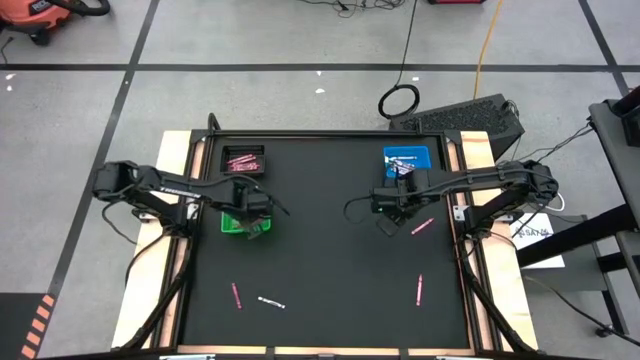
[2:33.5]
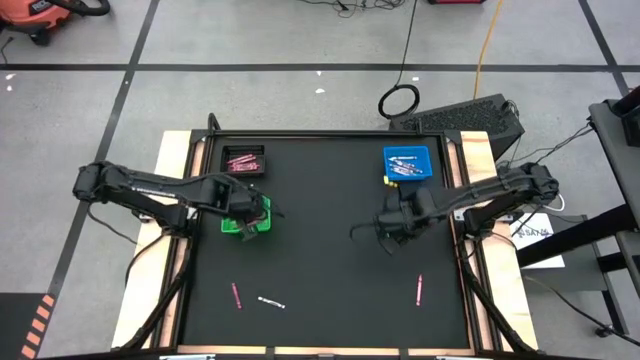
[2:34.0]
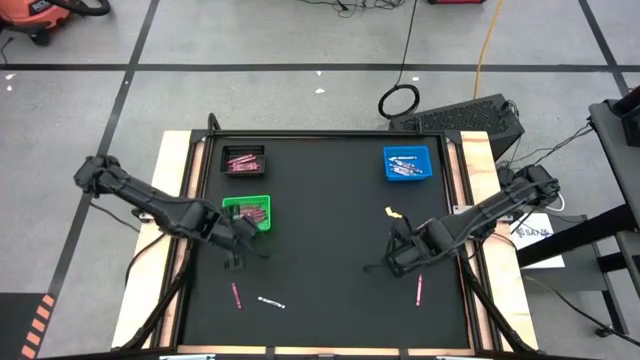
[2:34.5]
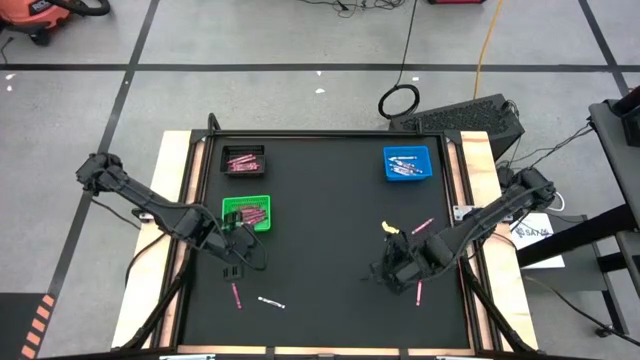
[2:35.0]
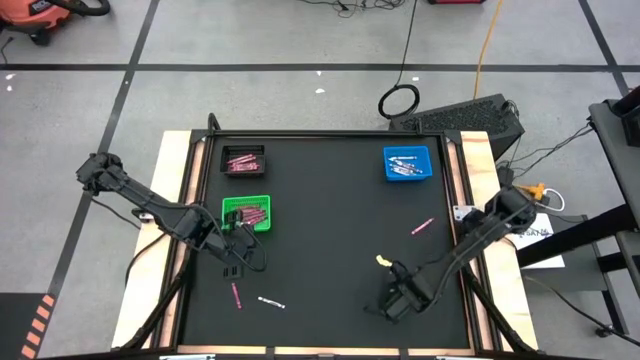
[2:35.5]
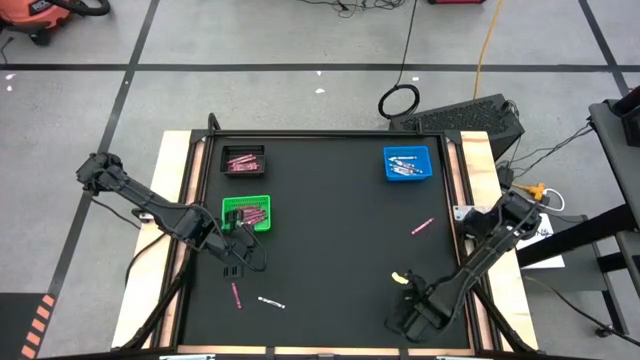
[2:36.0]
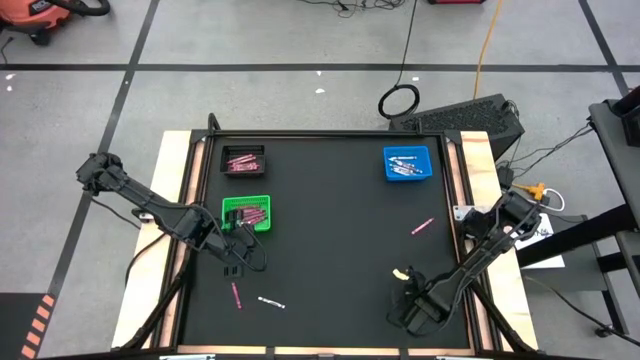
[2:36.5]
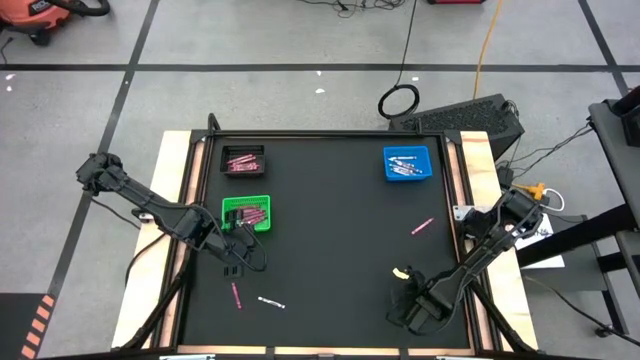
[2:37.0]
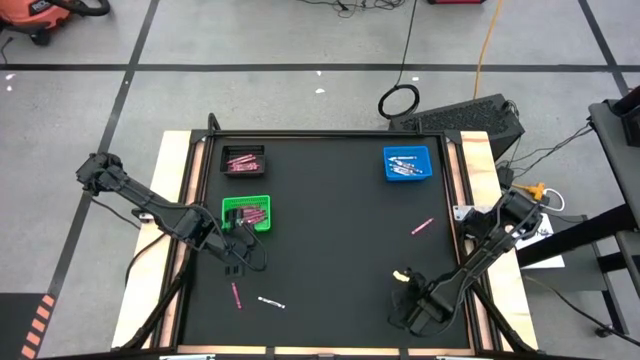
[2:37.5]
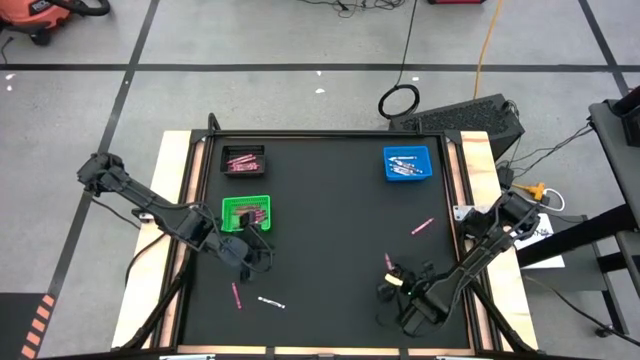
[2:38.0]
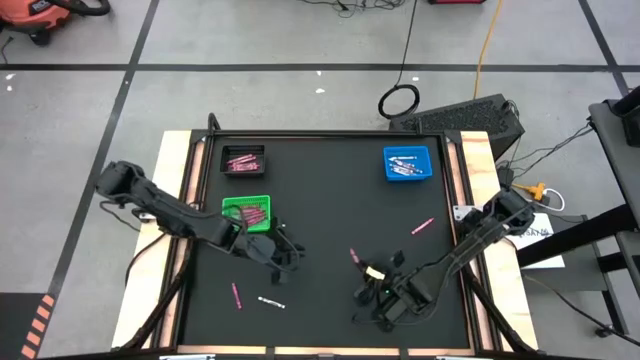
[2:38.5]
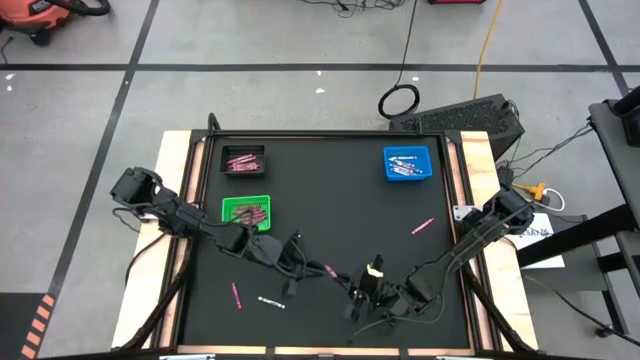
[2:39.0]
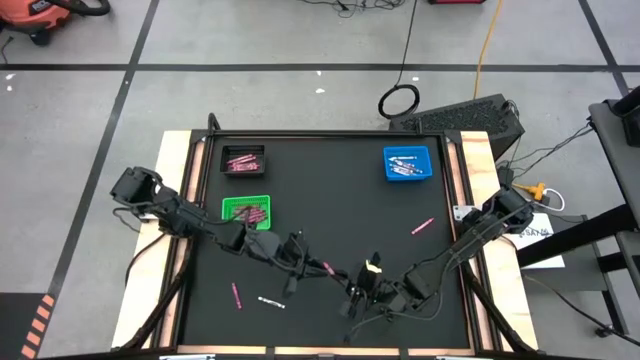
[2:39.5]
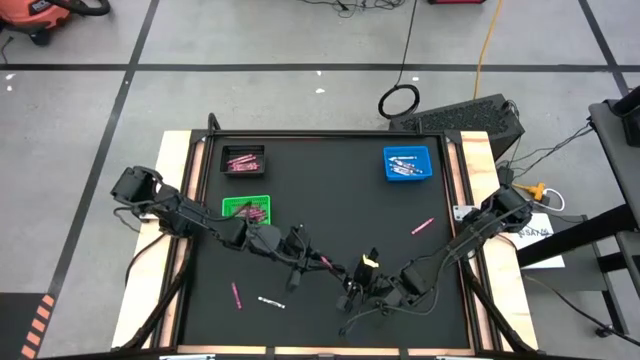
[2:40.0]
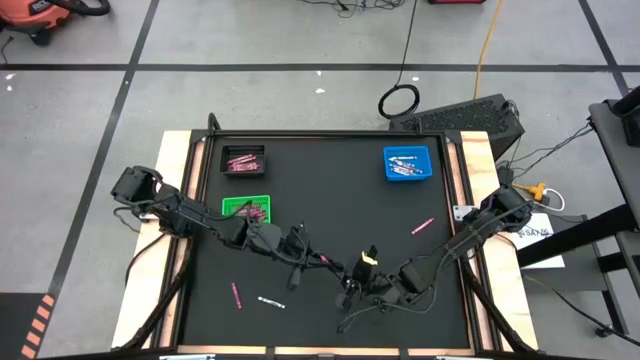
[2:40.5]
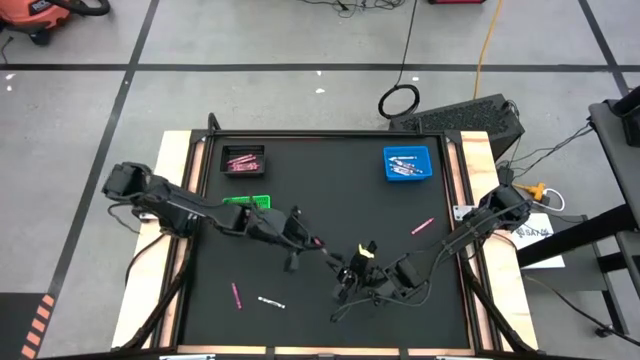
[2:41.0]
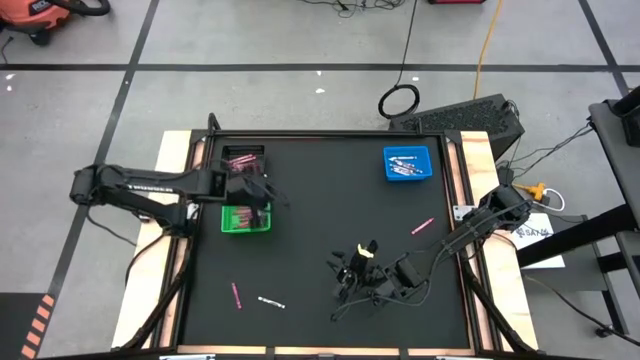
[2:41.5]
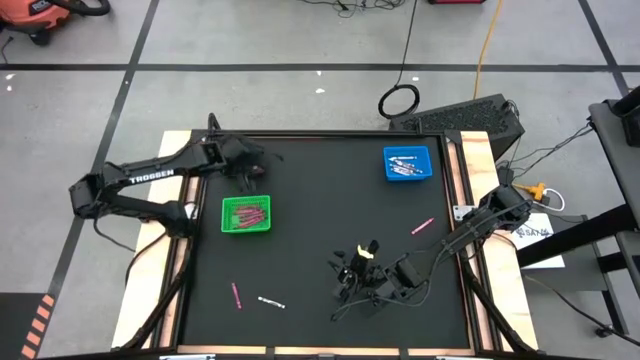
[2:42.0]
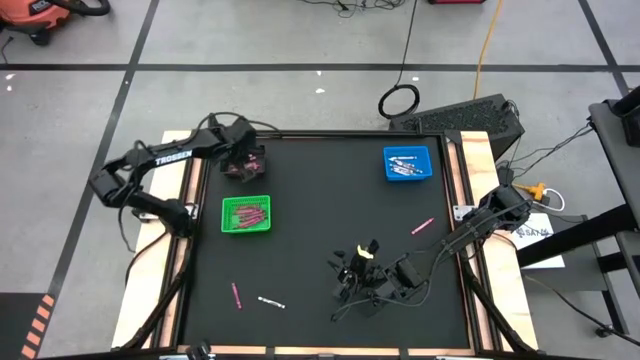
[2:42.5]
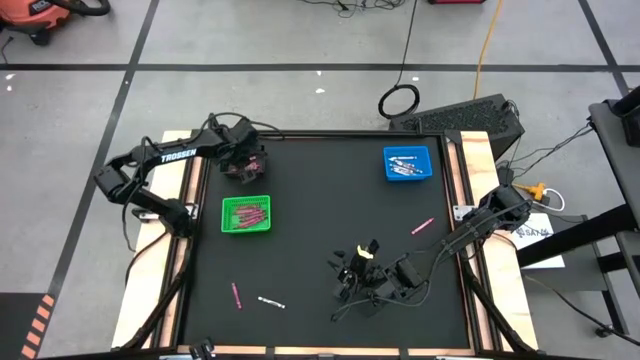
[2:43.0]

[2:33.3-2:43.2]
Task: Sort crayons
Put the pink crayon into the black bin

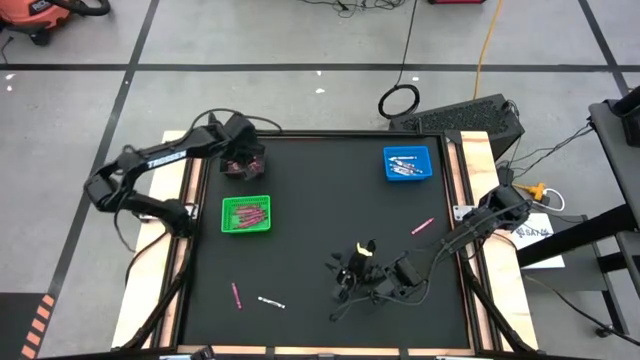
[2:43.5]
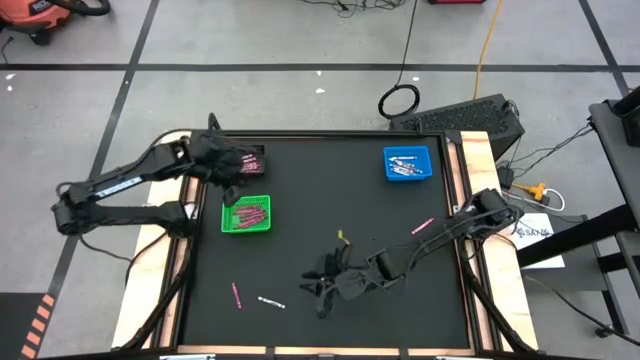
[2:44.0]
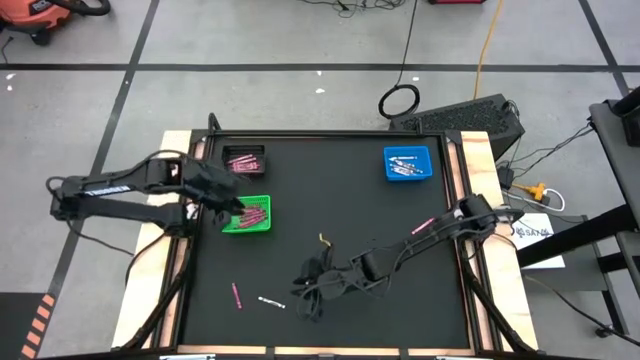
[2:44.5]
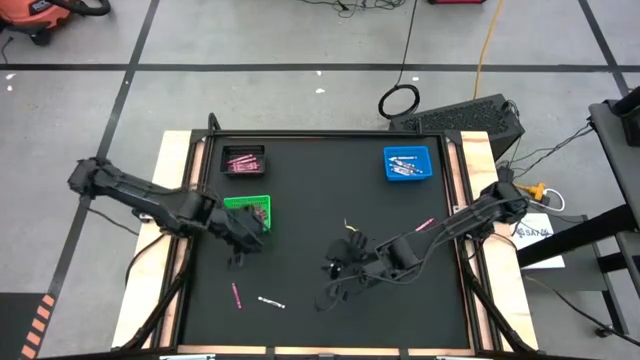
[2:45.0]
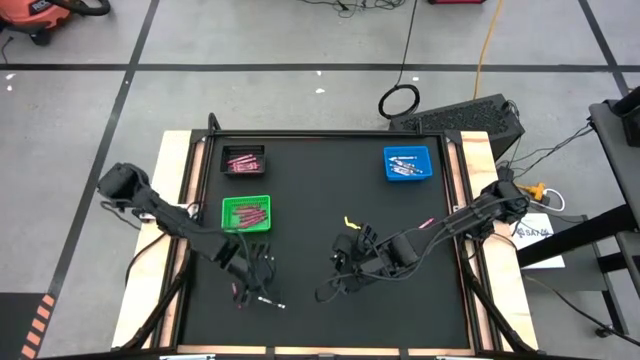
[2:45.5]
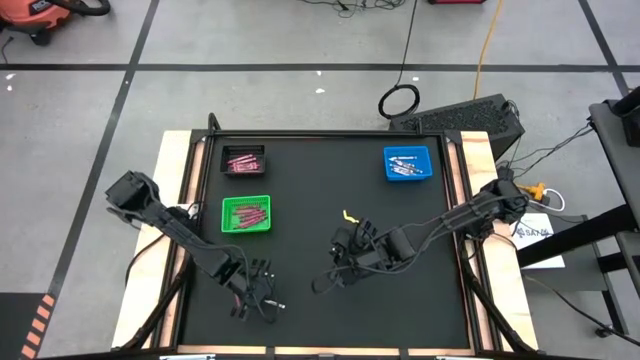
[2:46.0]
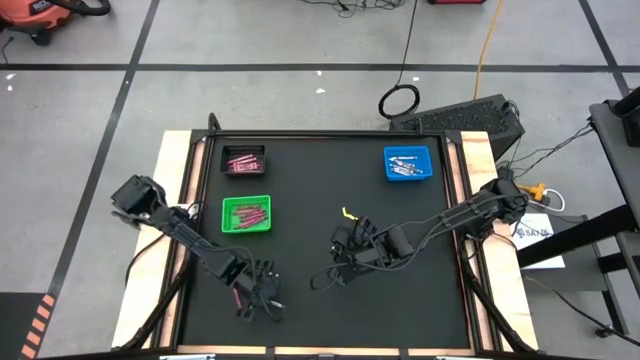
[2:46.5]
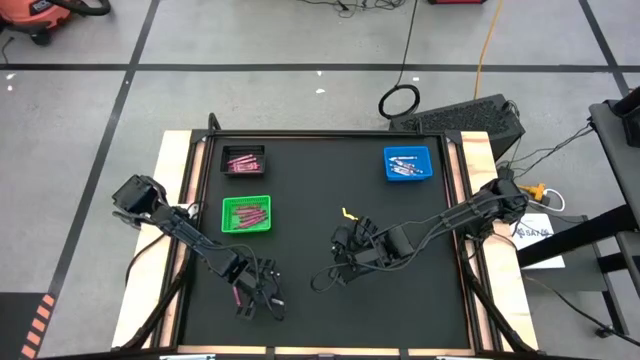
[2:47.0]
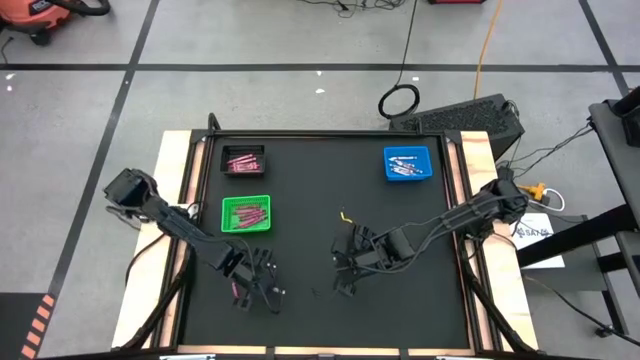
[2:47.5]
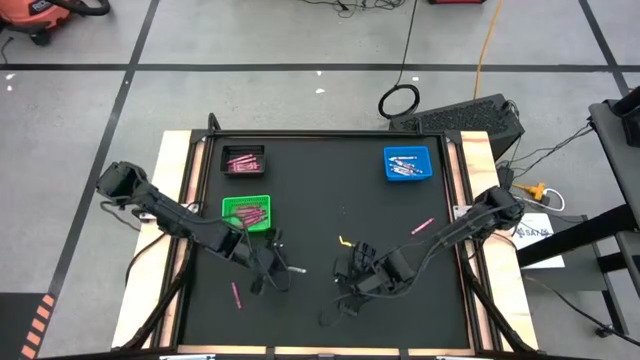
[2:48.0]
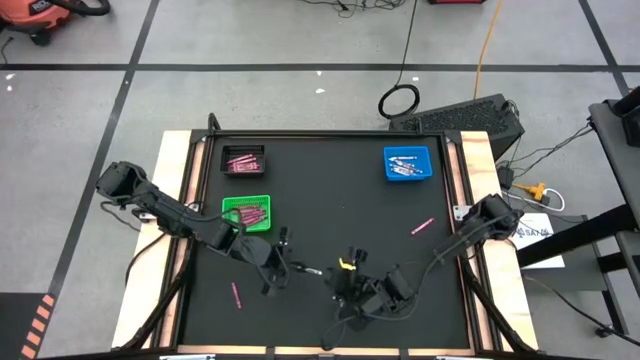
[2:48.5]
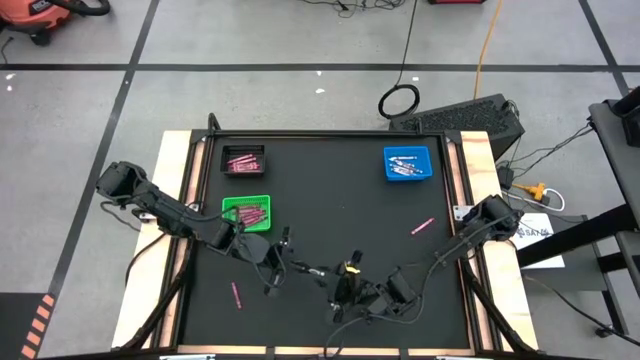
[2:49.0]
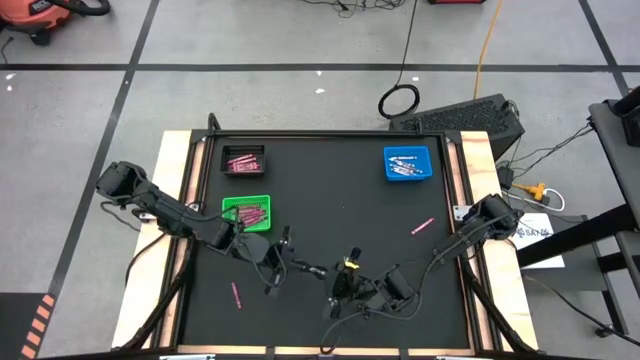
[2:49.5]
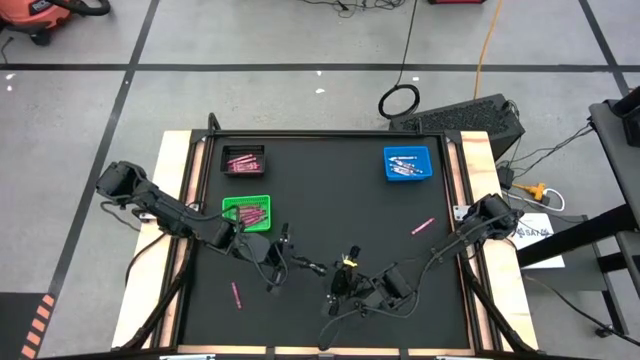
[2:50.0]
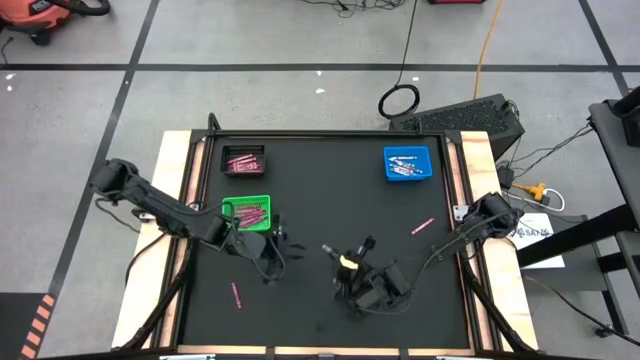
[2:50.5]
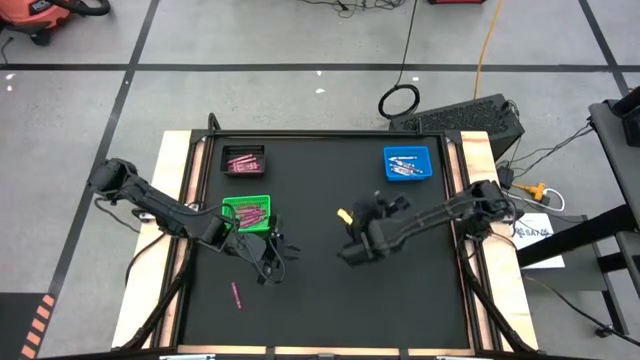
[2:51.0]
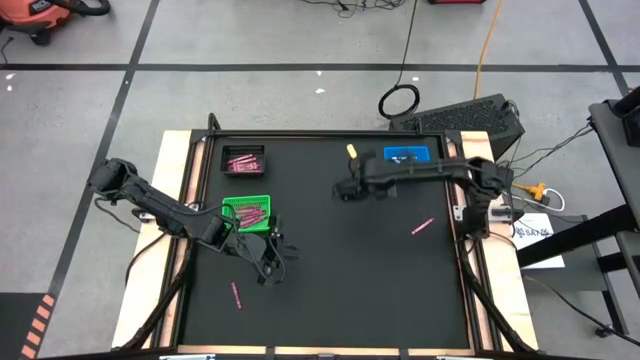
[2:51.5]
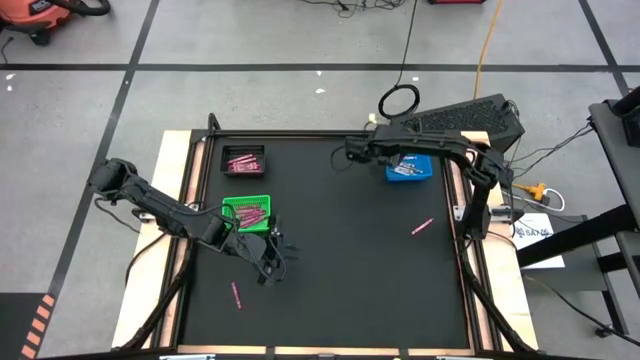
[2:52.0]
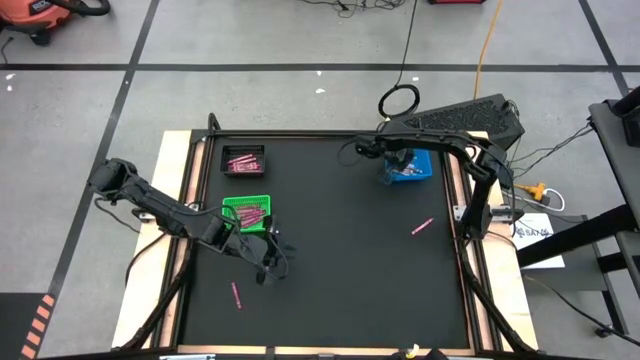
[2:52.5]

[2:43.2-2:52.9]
Put the white crayon into the blue bin

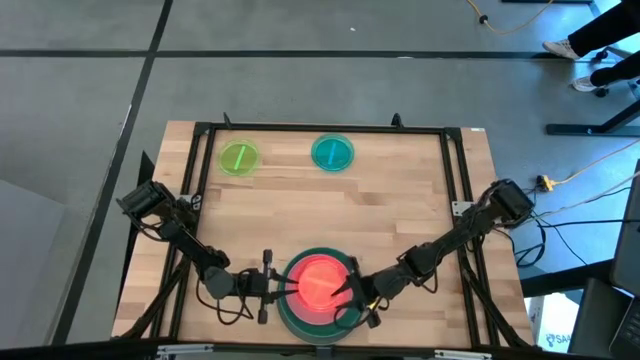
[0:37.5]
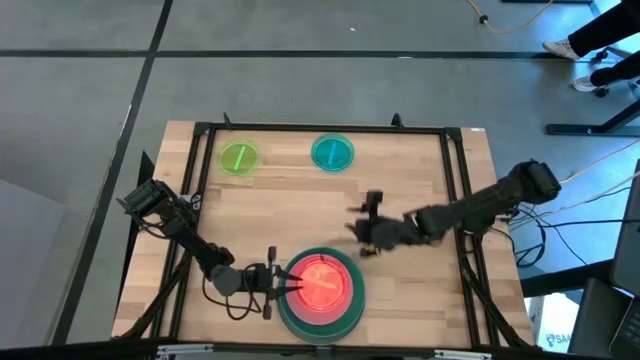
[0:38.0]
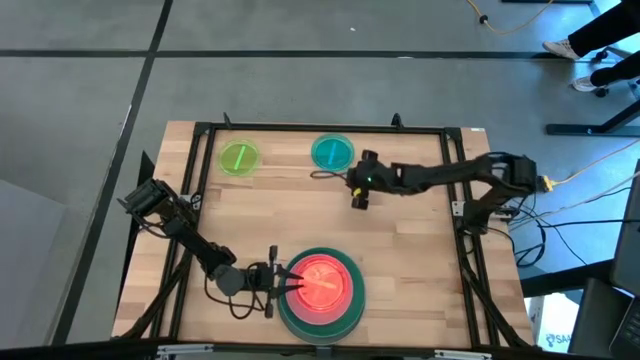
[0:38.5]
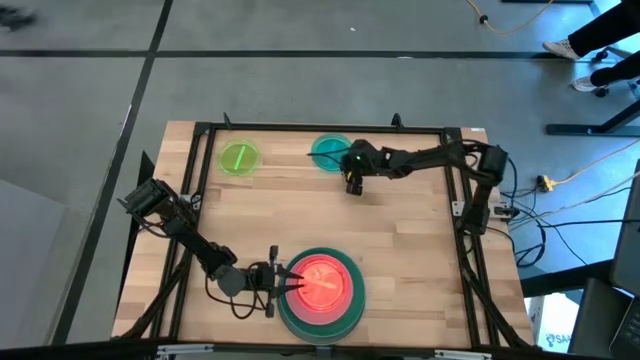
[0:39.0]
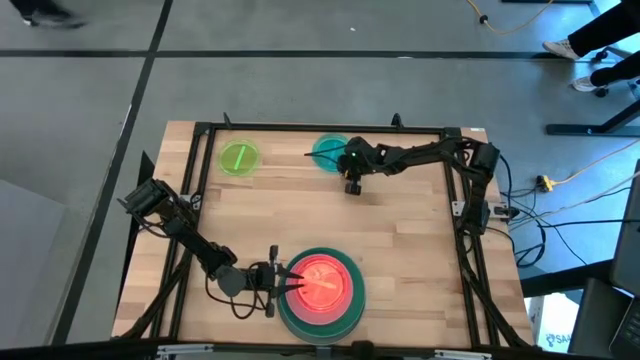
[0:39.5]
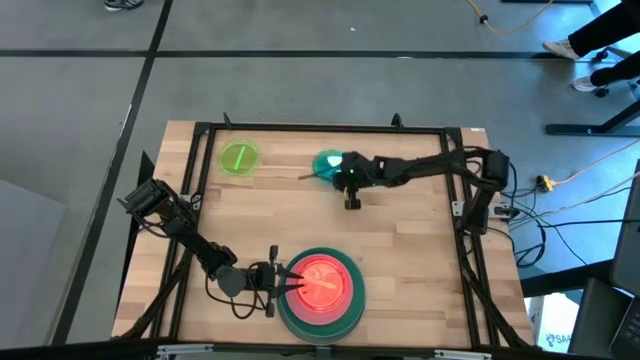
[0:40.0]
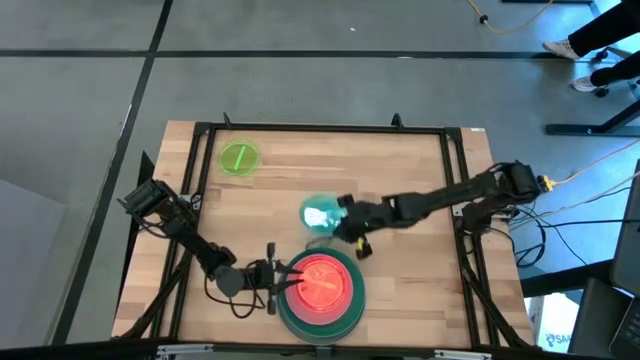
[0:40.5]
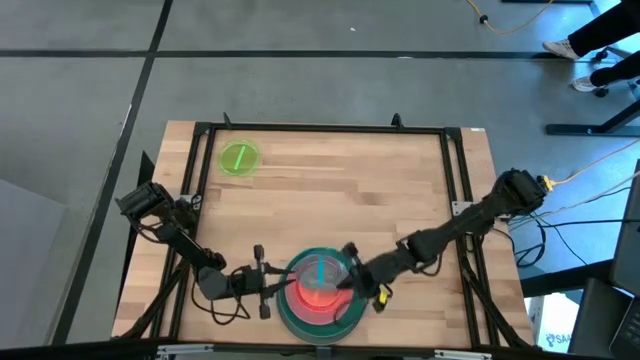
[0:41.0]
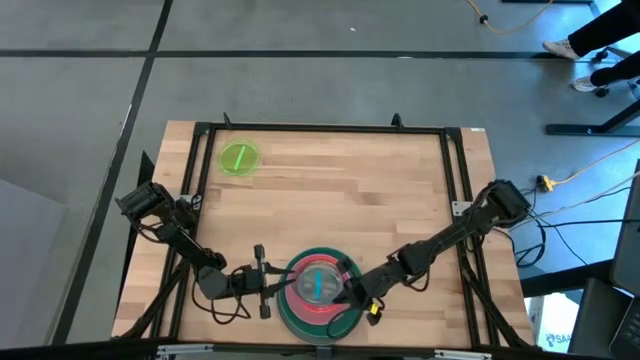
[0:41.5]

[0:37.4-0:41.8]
Task: Stack plastic plates
Stack the light blue plate on top of the light orange plate
